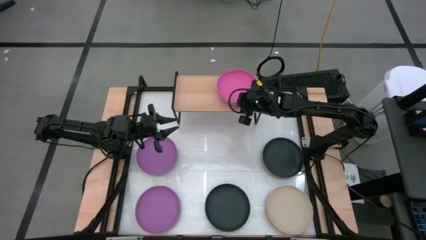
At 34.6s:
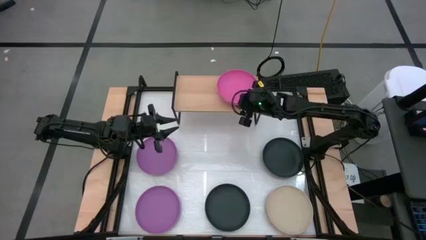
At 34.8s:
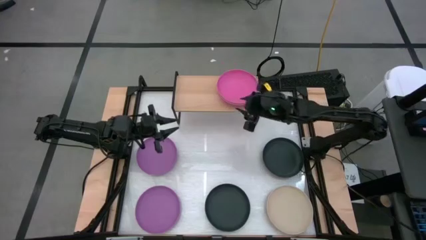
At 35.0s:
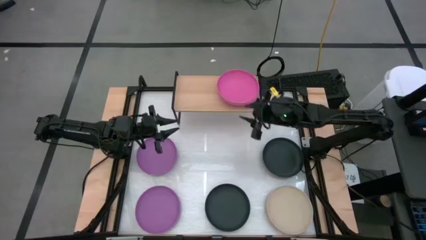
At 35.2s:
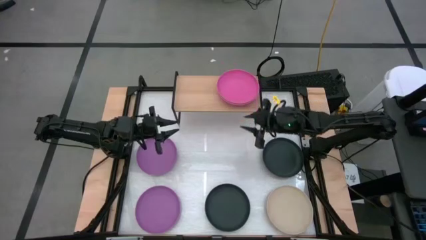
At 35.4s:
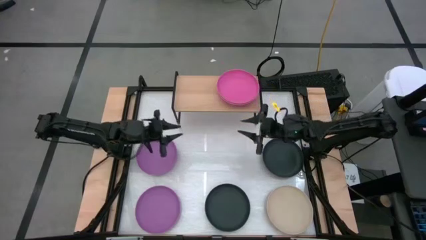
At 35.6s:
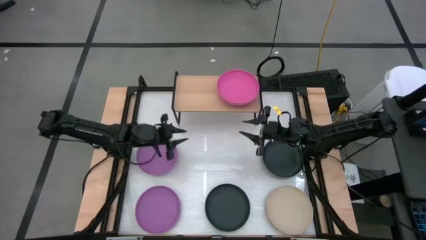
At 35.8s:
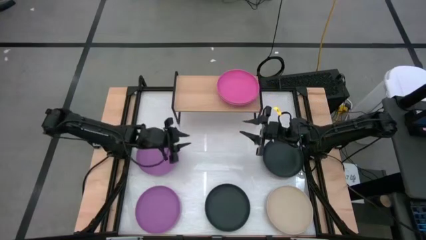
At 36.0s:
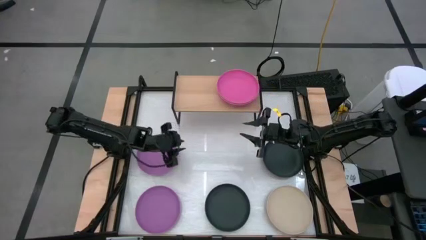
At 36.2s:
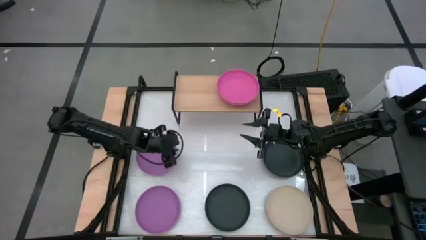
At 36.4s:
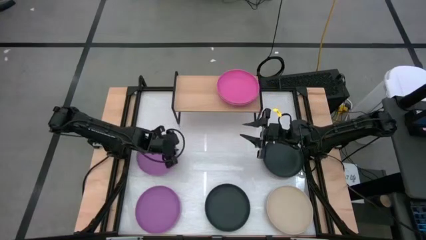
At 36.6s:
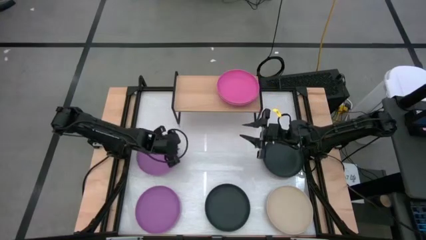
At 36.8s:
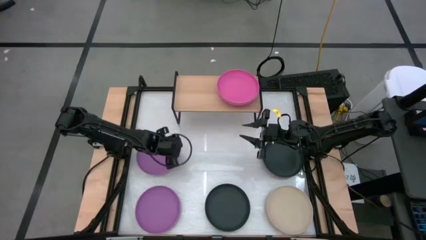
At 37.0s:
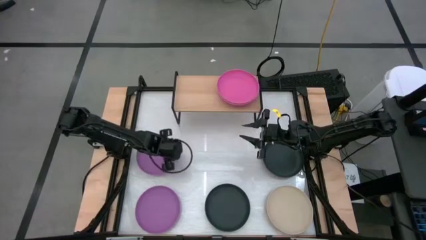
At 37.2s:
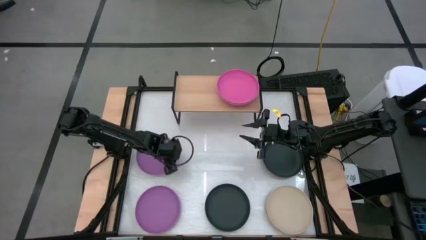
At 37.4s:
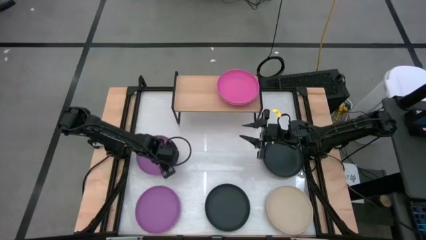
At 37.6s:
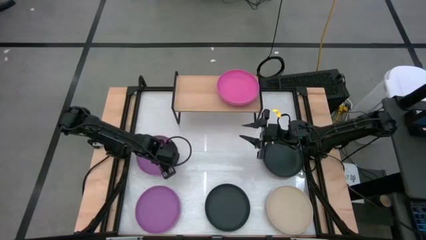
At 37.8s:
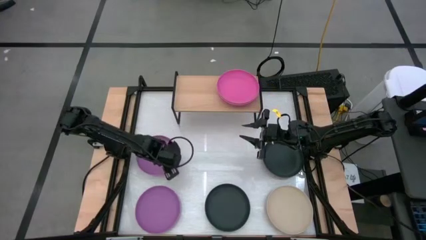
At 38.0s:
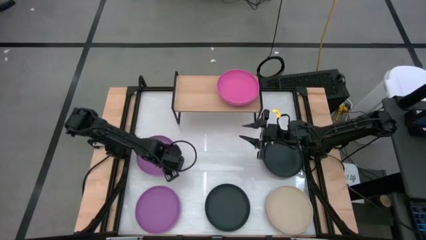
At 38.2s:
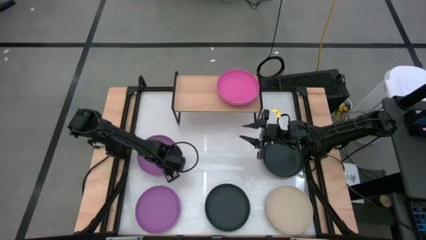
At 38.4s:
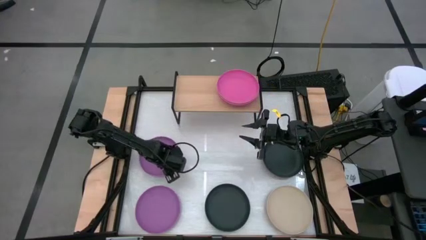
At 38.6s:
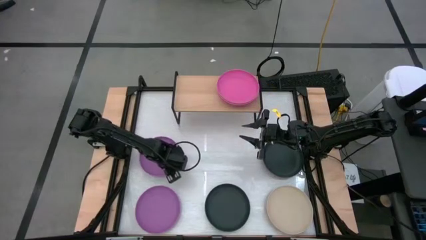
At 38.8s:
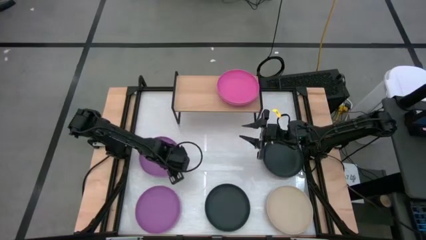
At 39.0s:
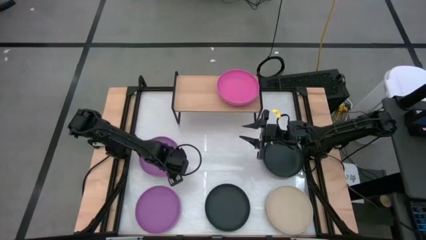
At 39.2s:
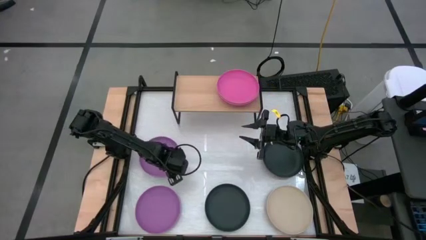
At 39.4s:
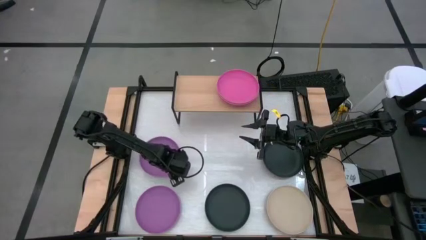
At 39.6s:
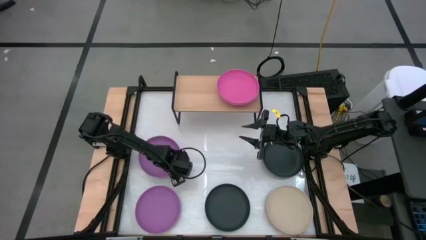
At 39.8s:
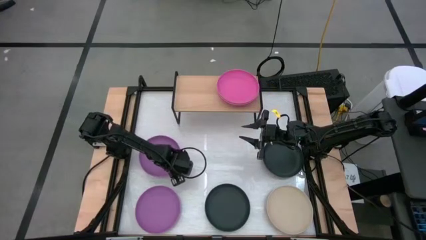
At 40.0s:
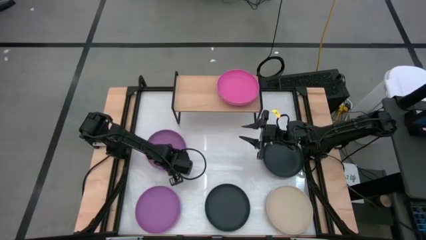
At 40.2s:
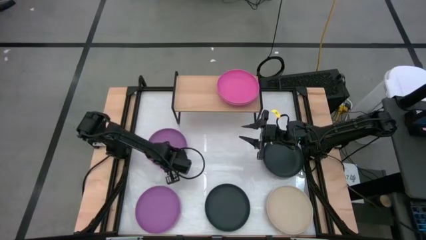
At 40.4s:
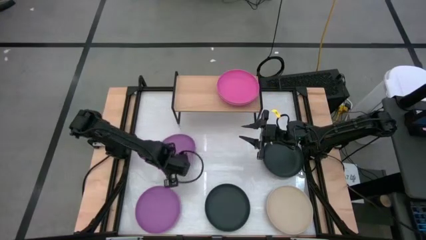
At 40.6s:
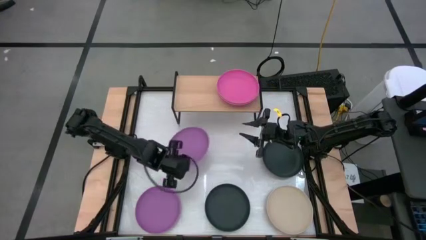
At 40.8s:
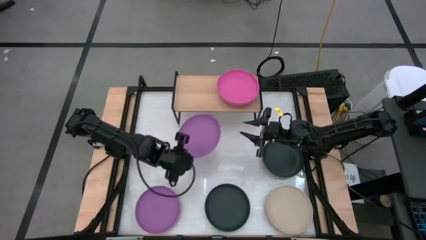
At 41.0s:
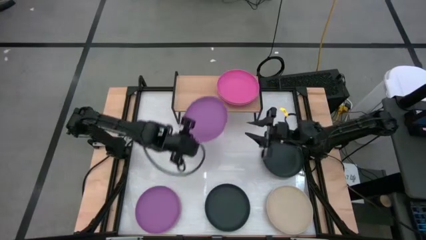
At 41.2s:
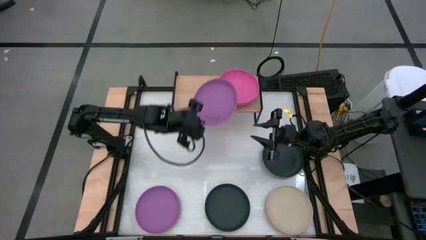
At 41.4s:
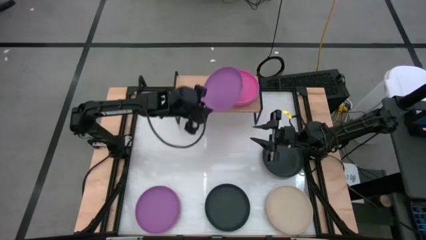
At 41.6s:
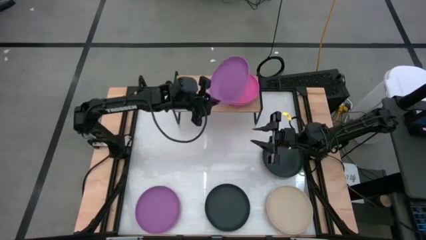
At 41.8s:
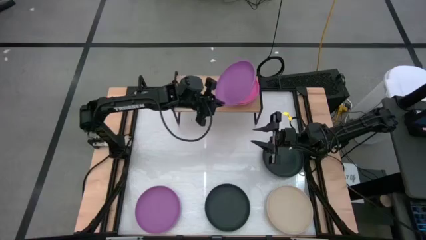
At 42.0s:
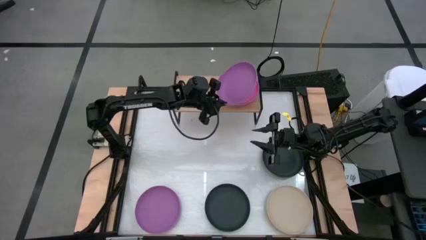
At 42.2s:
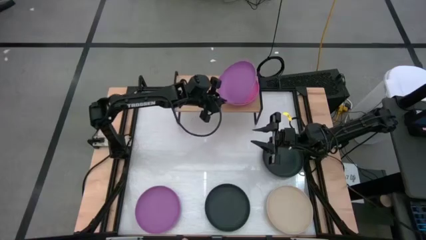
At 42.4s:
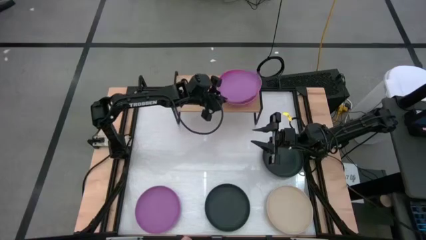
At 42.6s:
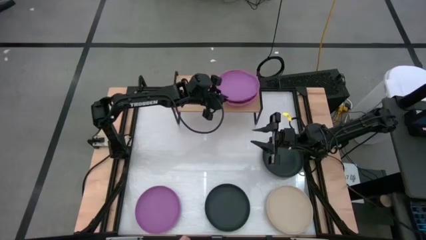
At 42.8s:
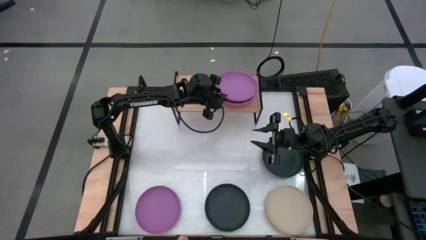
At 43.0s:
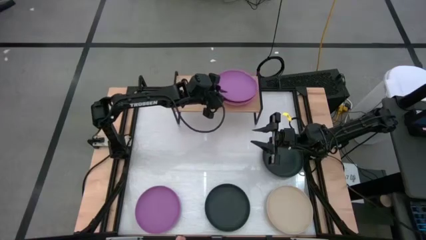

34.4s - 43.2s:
Task: Place and stack plates onto a shelf
Stack the top purple plate on top of the pink plate on the shelf

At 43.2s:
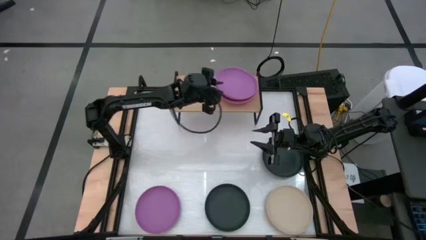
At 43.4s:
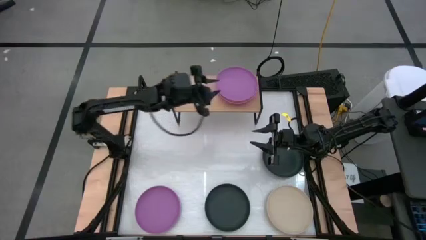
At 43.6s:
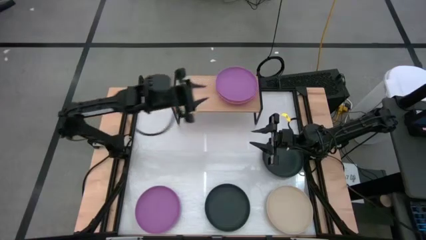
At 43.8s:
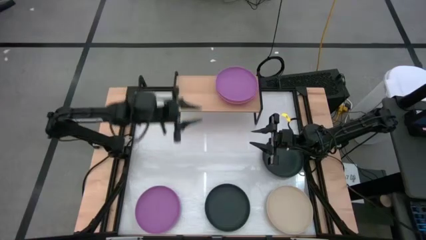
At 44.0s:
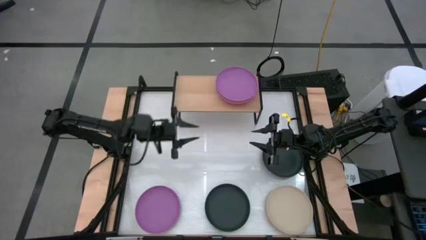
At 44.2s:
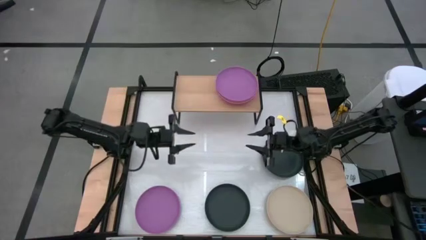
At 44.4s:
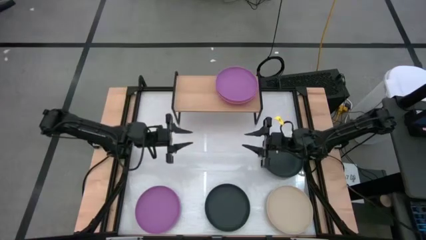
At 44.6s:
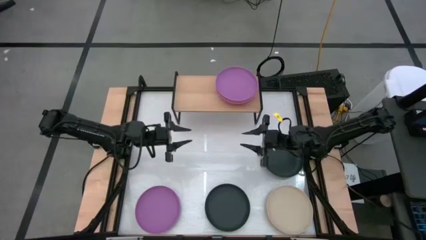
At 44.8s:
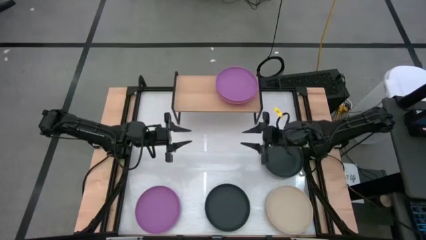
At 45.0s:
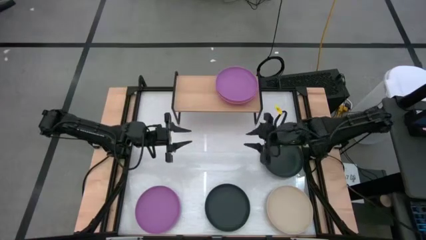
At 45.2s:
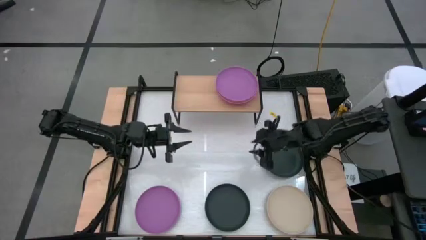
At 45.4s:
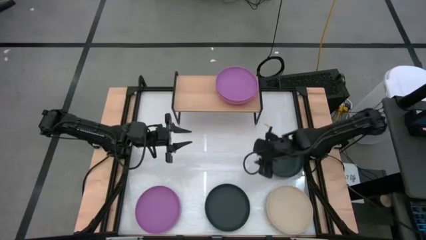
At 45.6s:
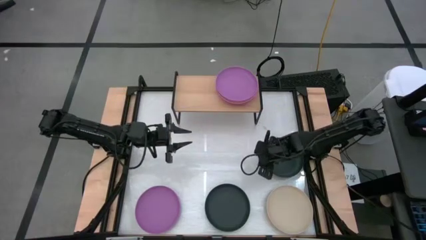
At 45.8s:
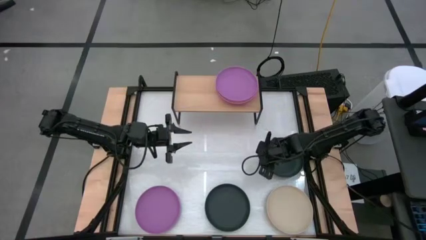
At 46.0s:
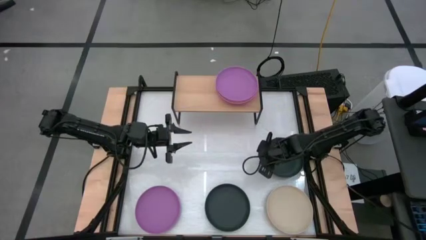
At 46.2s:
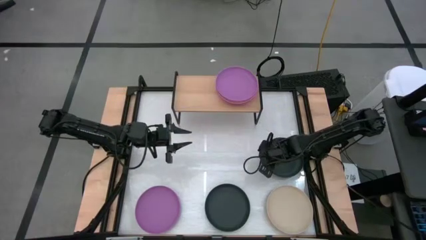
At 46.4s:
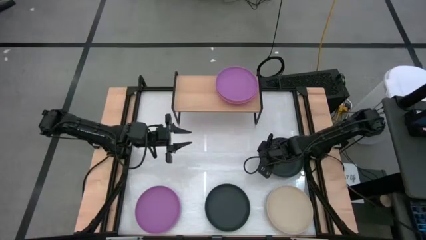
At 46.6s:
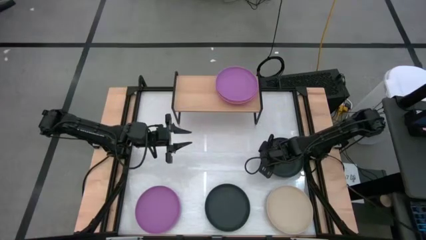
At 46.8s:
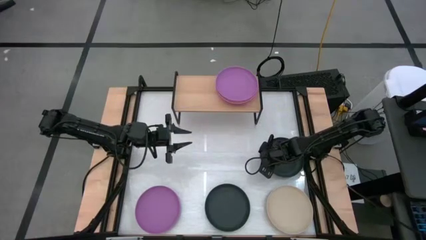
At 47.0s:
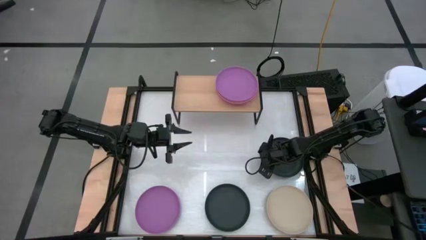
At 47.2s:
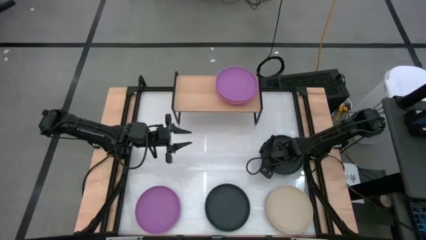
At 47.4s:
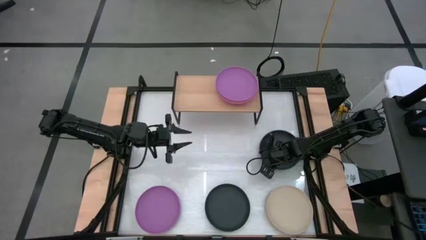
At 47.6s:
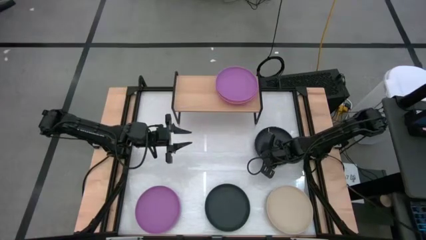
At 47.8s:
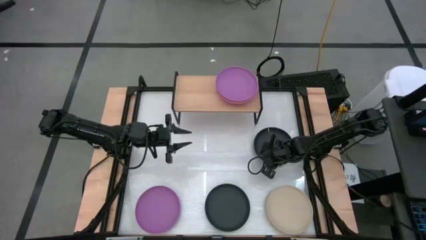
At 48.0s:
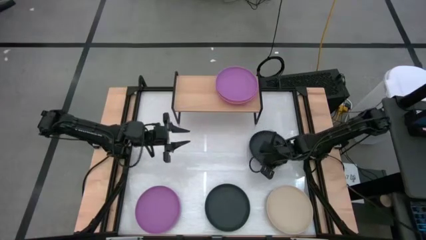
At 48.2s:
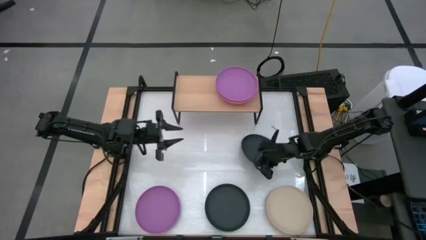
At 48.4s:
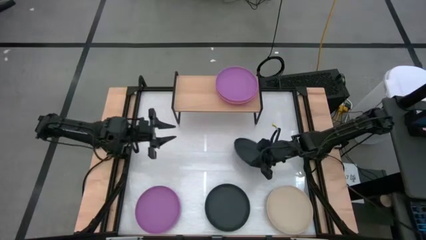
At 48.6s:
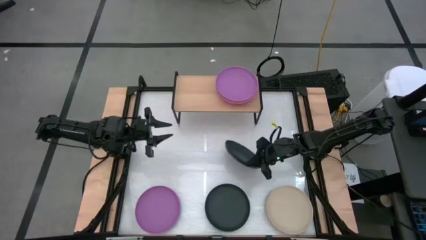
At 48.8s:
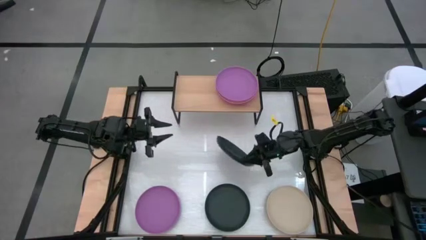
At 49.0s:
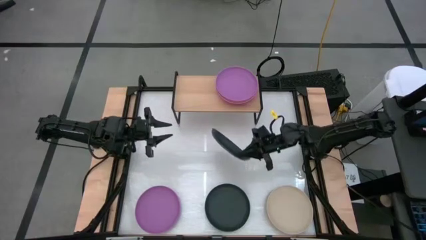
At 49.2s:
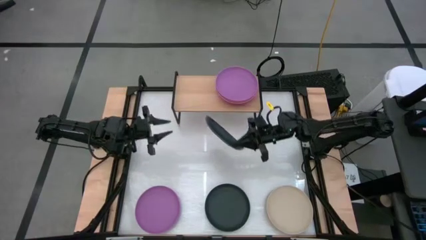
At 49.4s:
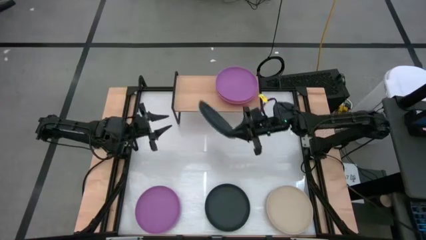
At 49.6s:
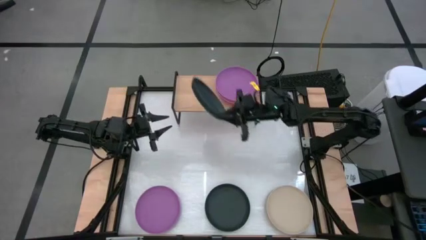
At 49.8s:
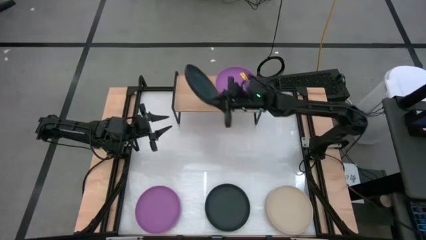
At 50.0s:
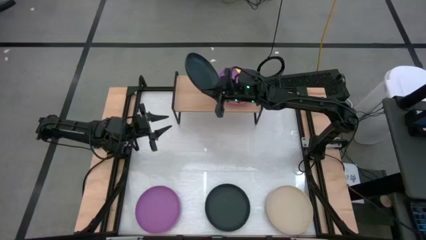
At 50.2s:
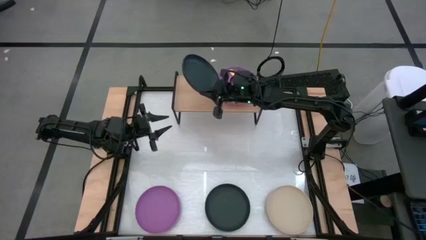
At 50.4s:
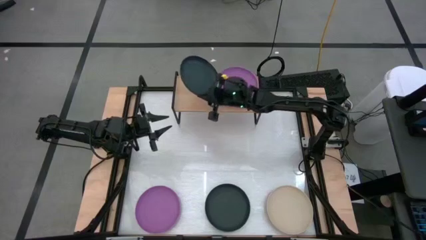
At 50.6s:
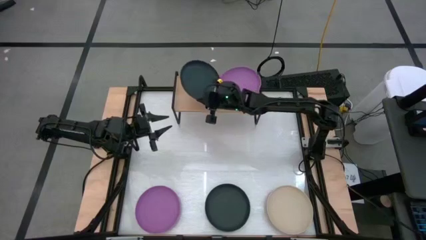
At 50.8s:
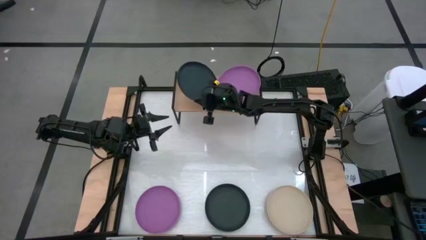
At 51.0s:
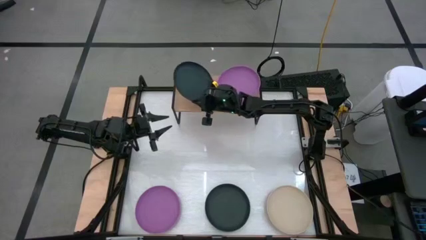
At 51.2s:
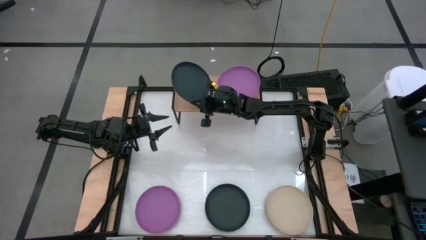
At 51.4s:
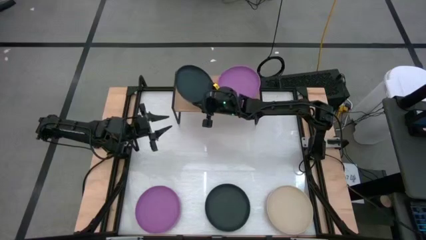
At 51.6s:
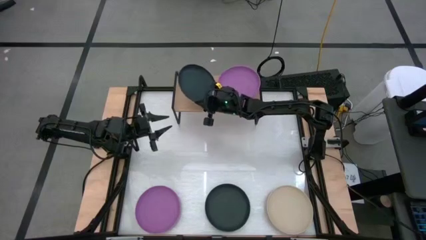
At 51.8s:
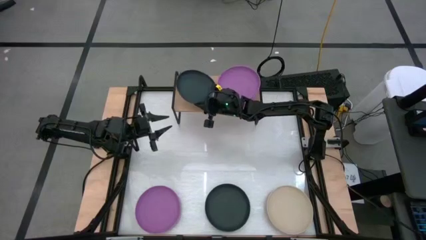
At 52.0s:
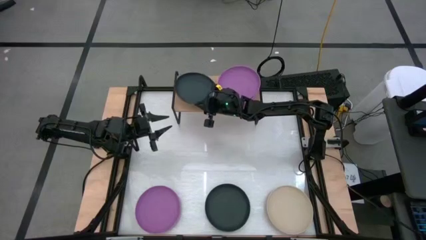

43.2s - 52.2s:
Put the top black plate on the shelf
